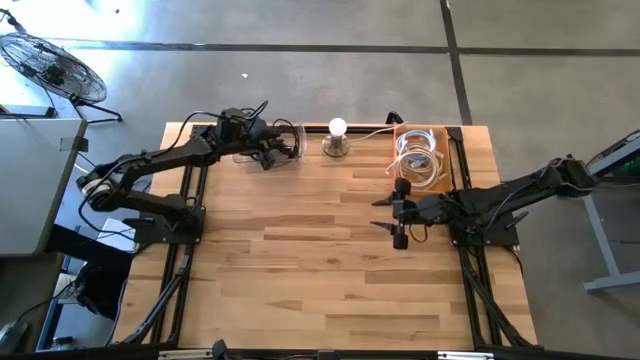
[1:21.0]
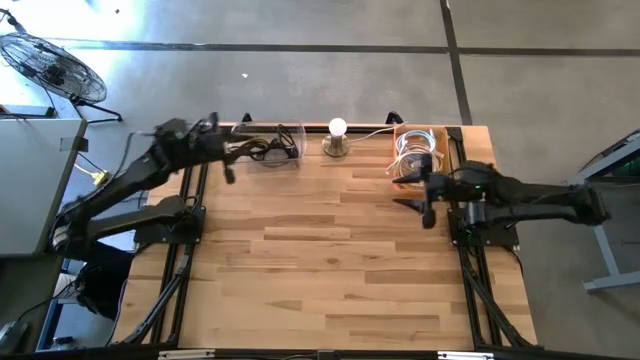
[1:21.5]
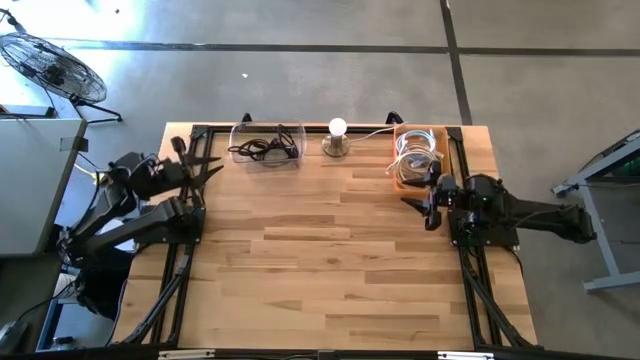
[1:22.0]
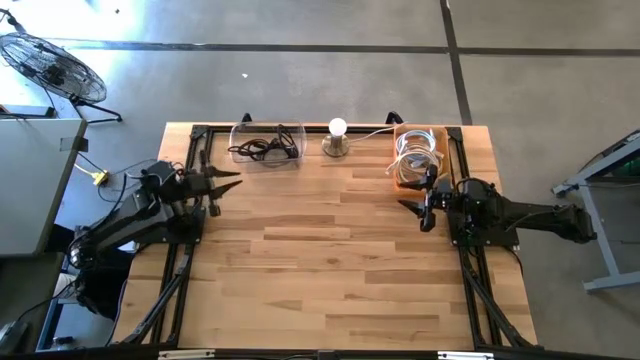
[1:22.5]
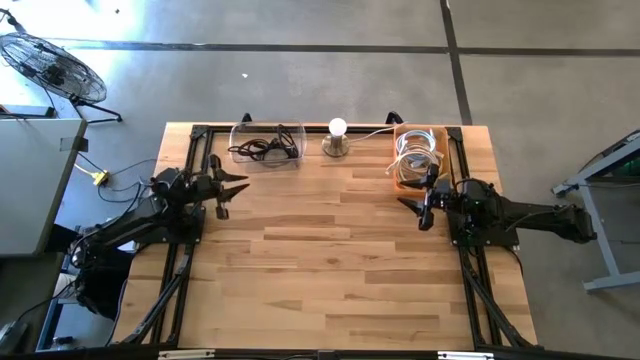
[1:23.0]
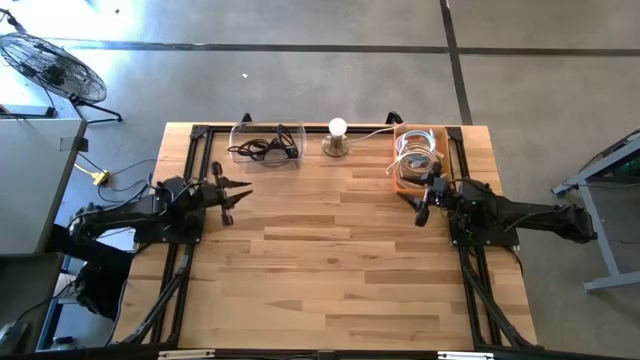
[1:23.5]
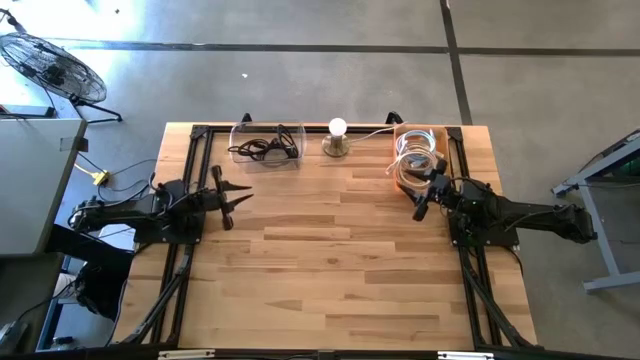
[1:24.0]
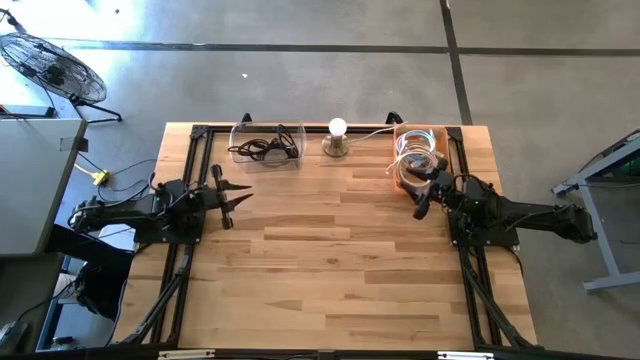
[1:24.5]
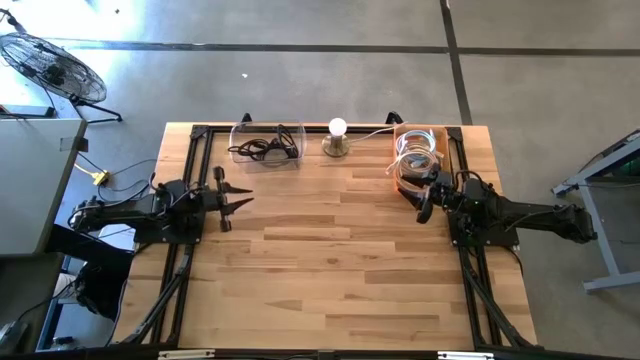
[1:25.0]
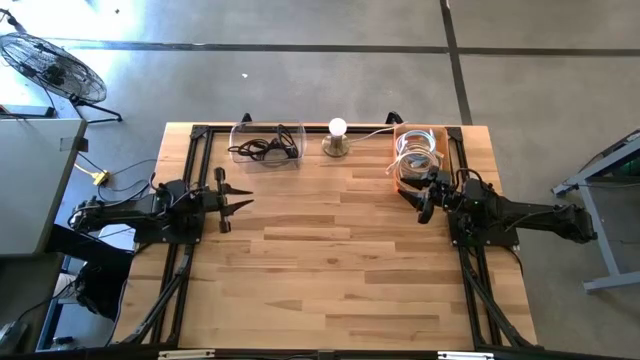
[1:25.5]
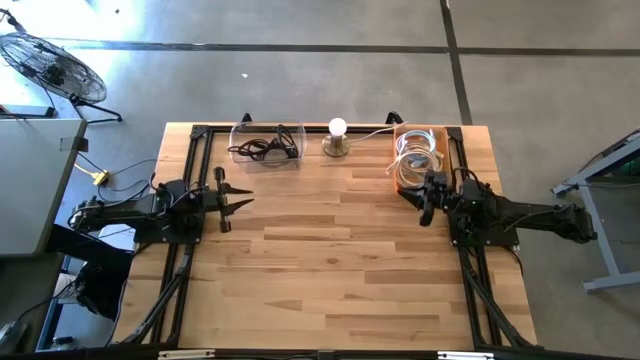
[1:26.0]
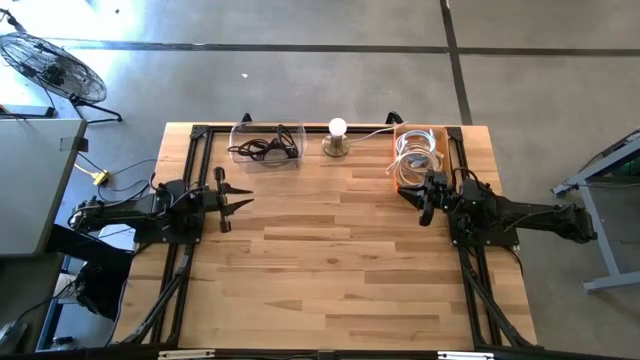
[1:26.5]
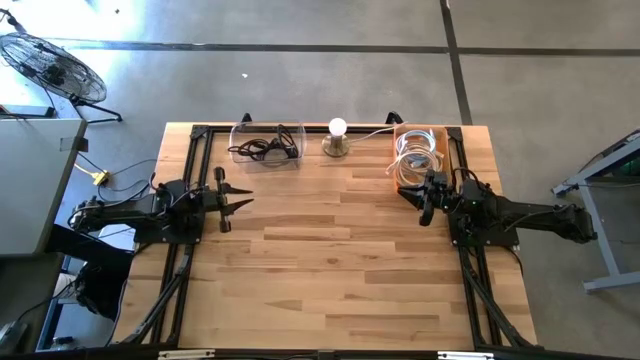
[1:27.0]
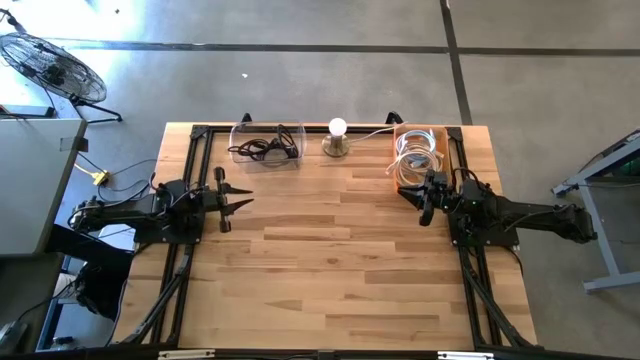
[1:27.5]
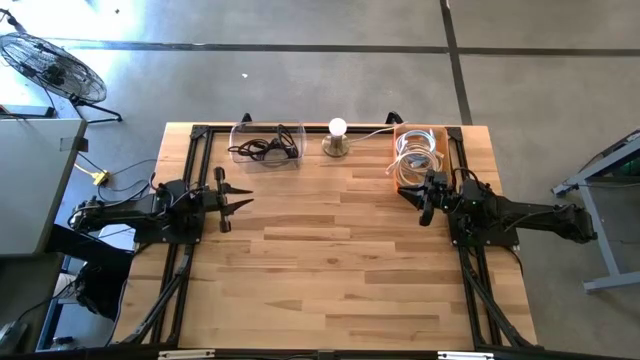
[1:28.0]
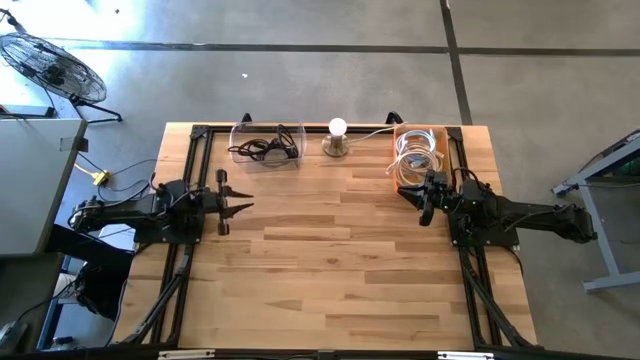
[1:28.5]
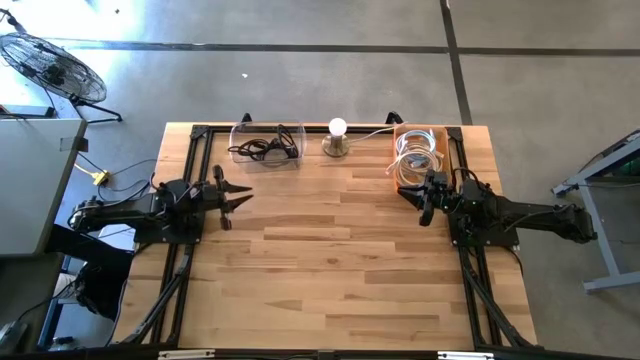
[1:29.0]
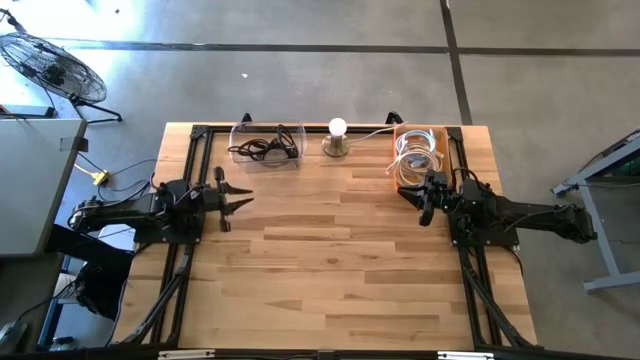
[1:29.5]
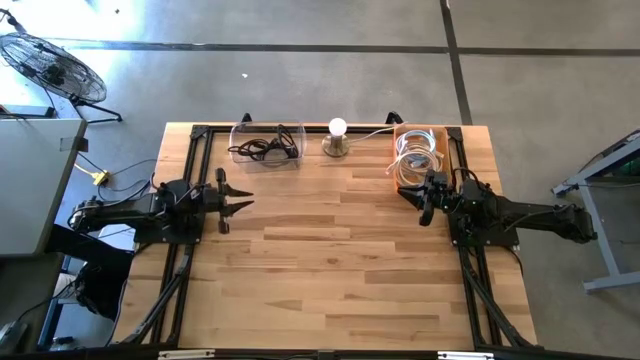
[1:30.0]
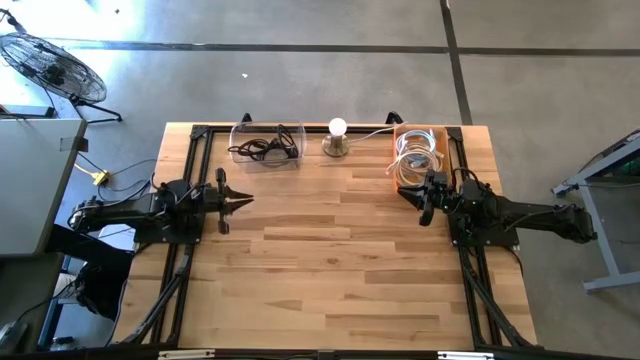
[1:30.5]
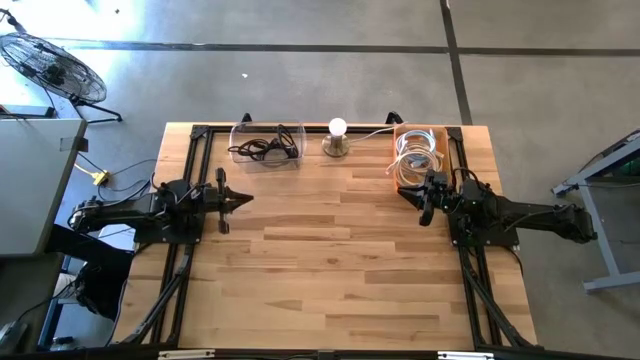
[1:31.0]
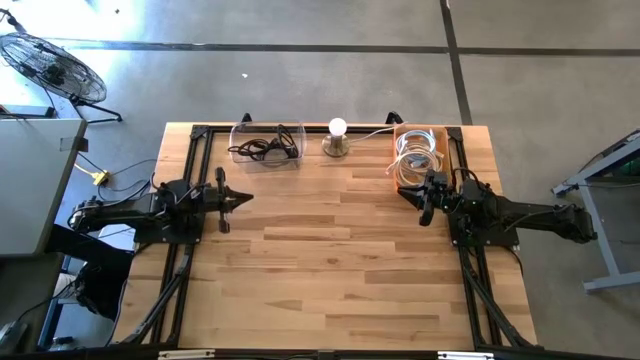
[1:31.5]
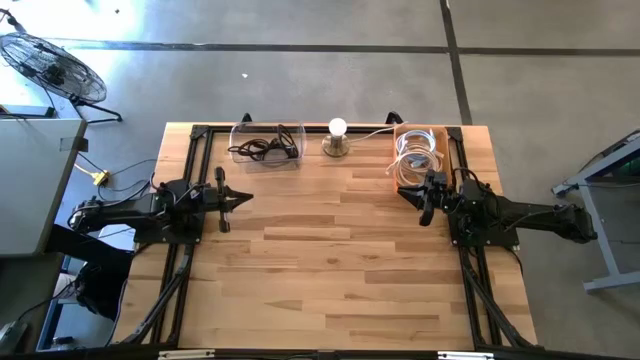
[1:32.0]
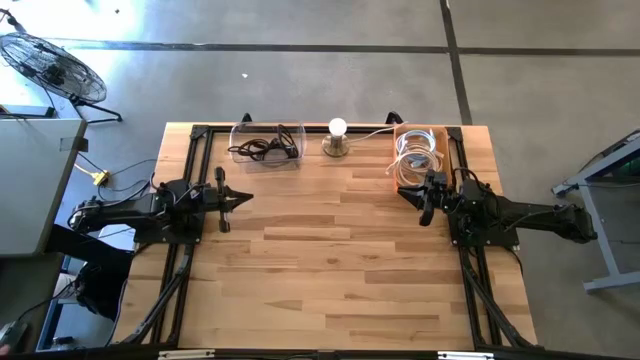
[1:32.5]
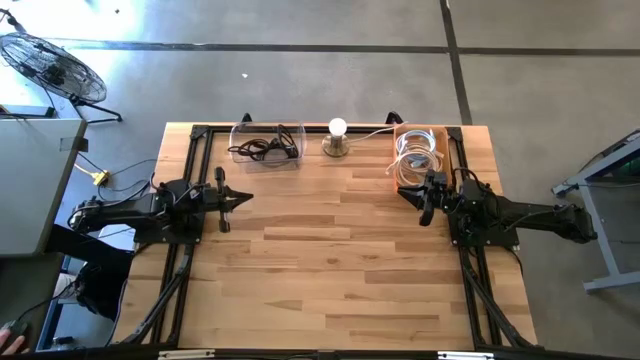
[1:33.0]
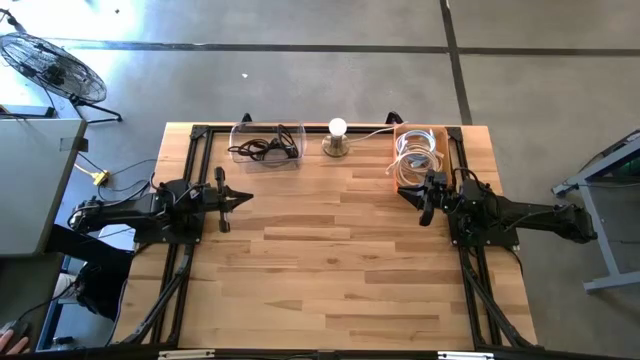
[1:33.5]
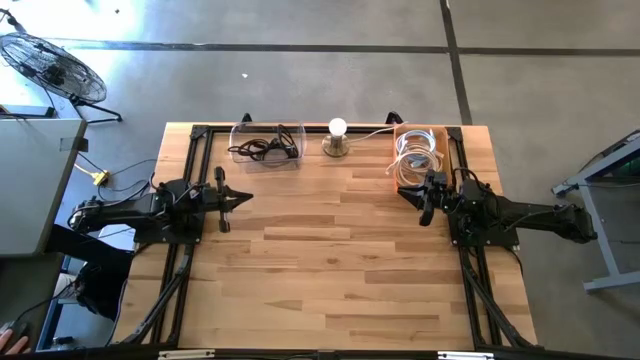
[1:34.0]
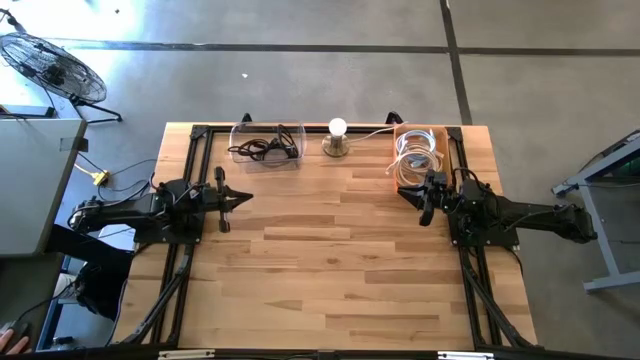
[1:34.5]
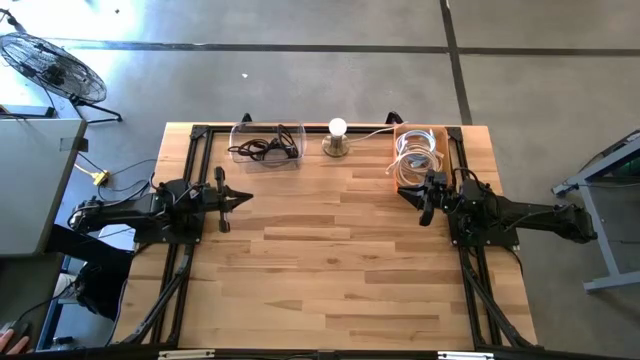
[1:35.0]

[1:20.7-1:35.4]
Task: Pick & Place USB Port
Return to Home Position

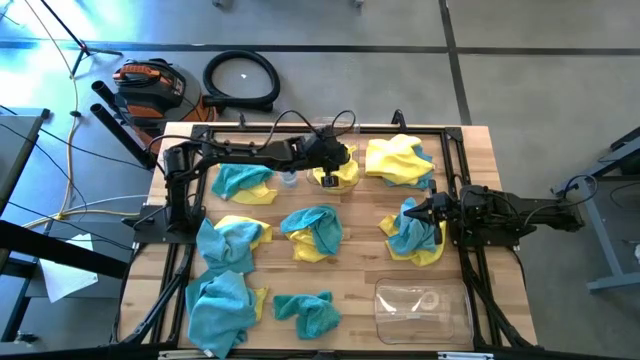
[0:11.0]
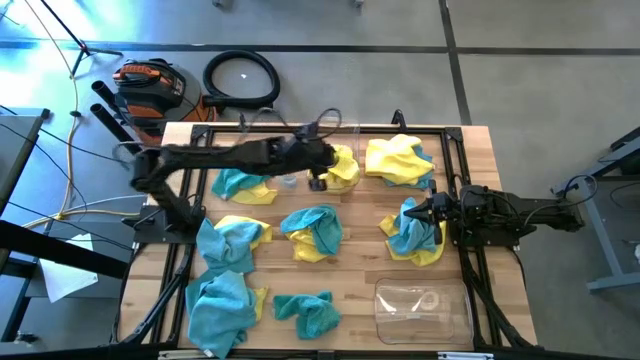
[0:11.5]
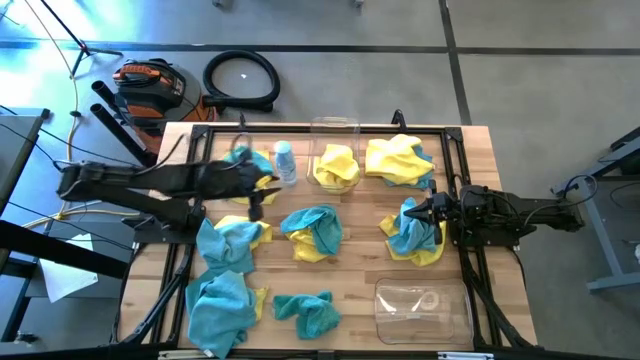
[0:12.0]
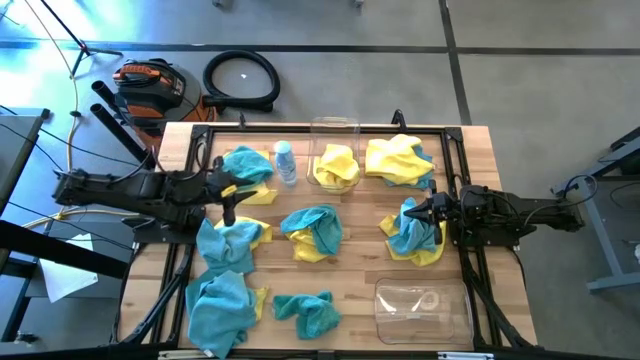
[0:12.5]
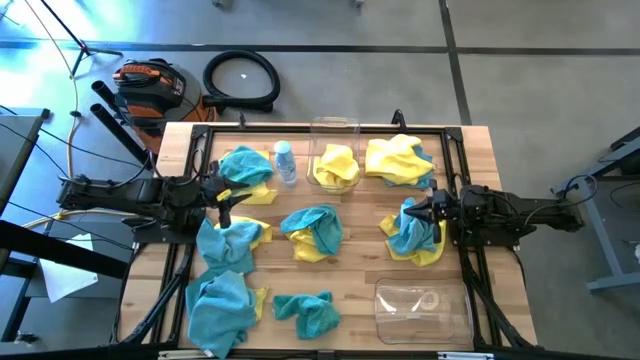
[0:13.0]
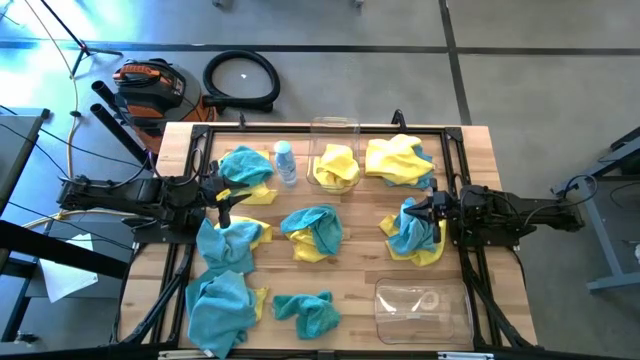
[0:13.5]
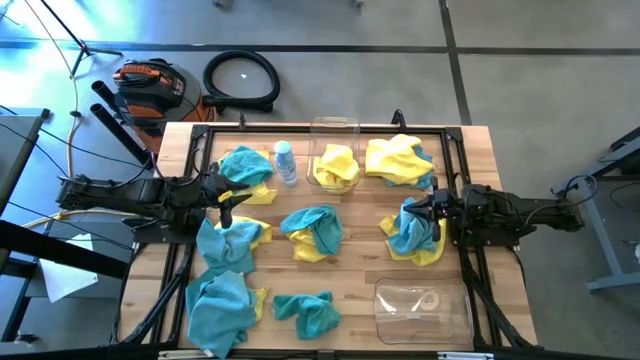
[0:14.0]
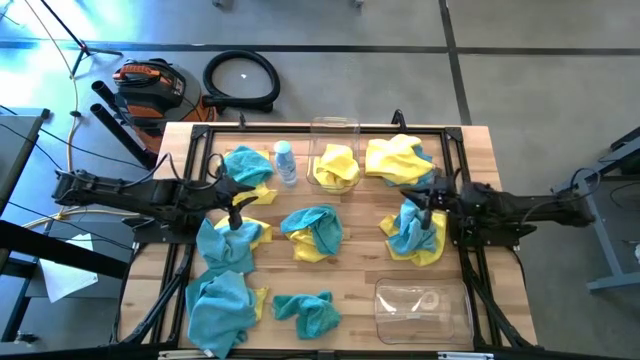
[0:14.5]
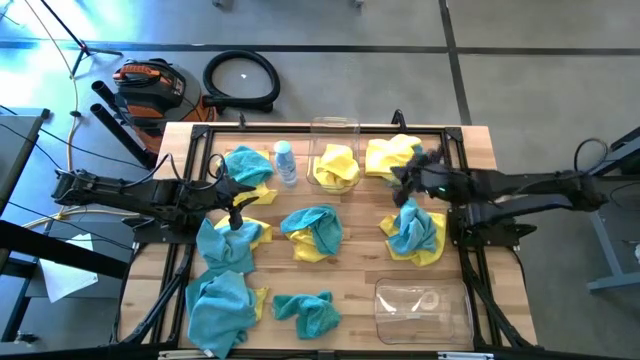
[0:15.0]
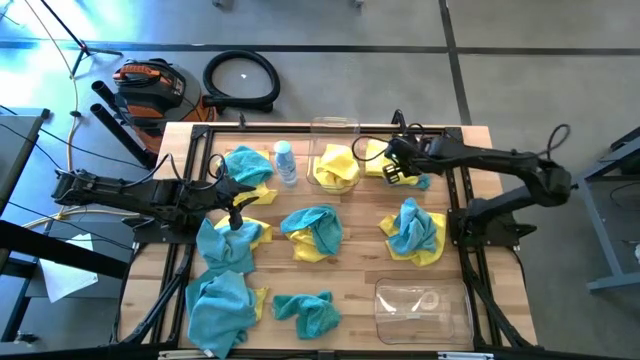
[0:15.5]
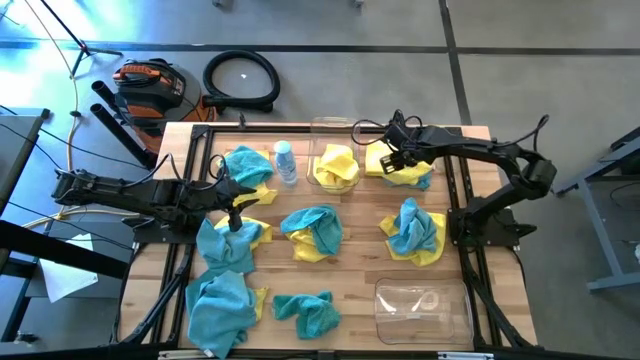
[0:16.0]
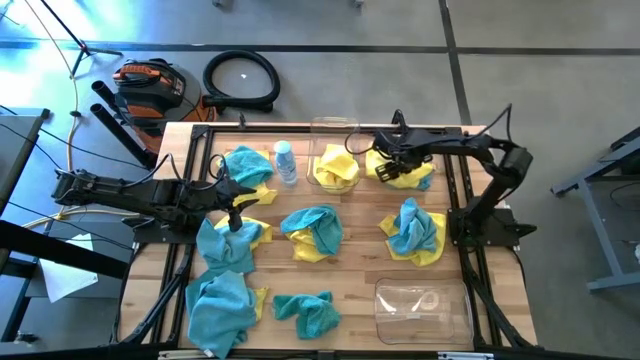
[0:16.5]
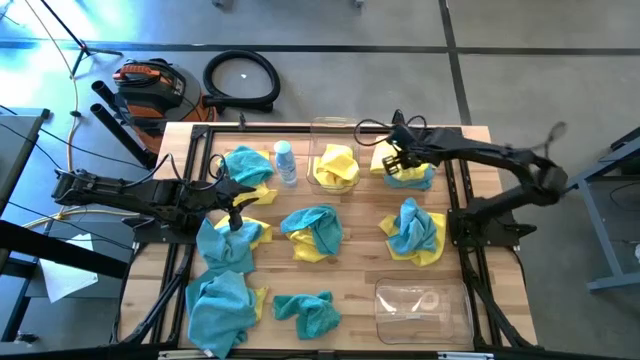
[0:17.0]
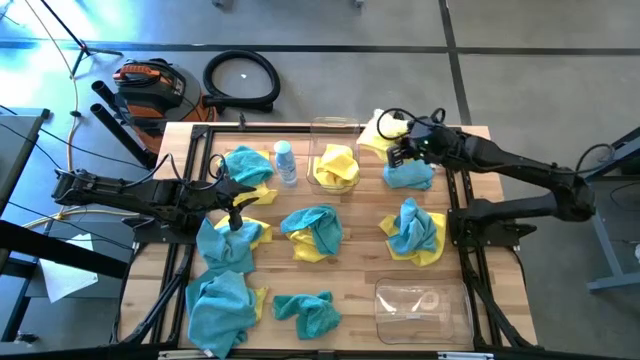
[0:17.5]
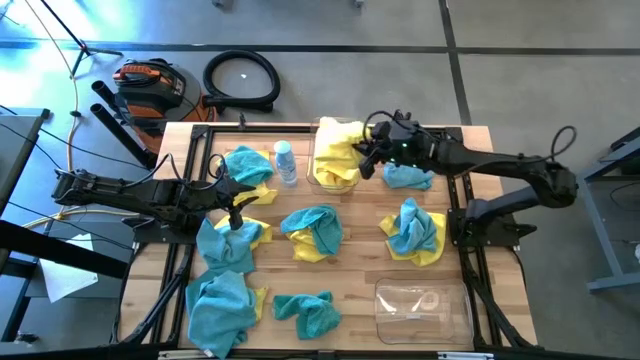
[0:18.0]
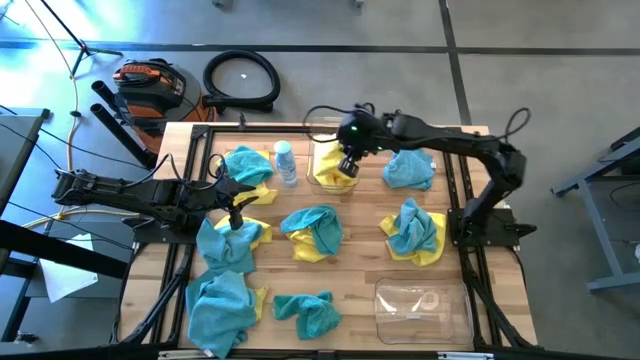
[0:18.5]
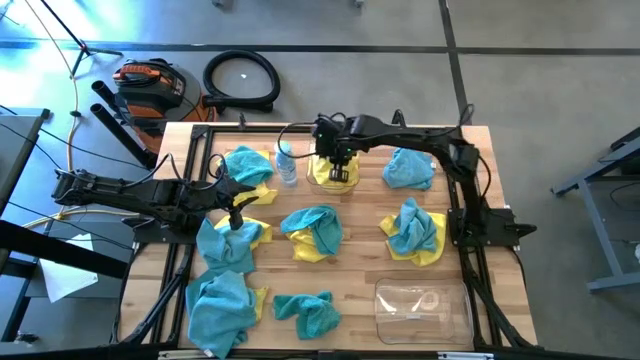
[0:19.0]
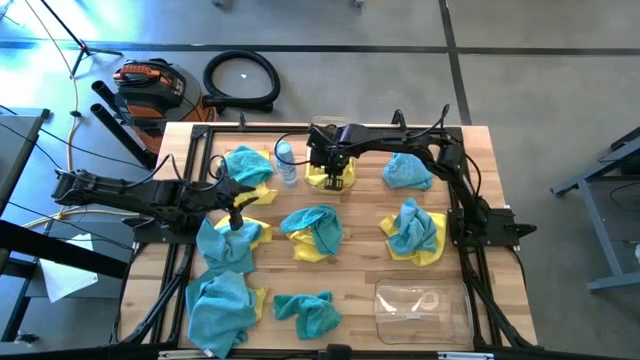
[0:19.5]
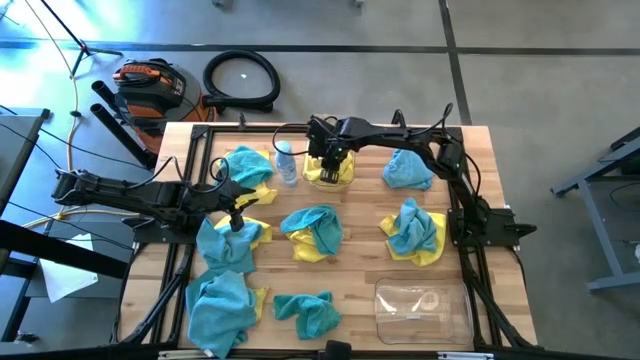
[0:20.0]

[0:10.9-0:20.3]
Task: Sort microfiber towel by color & place in baskets
Put the yellow towel into the top transparent bin
